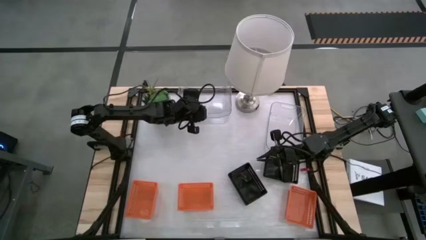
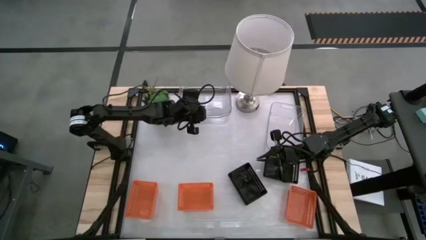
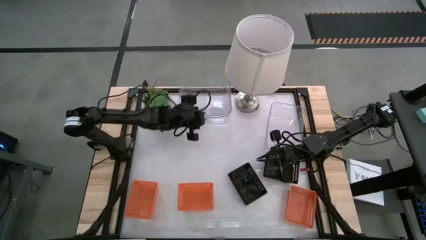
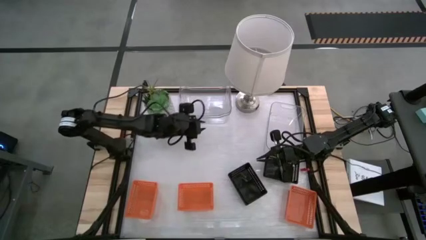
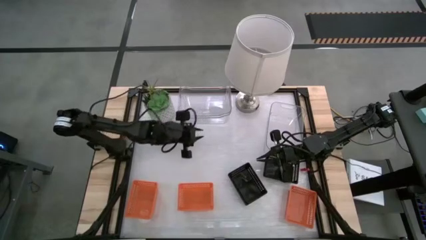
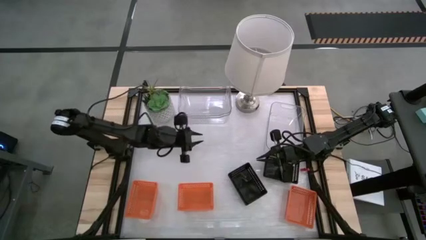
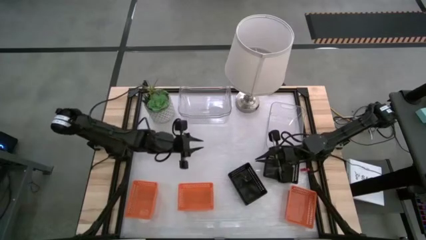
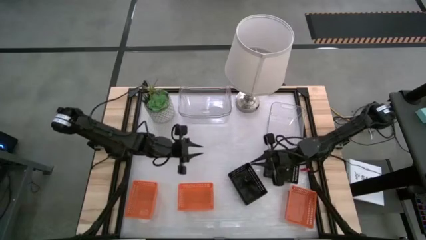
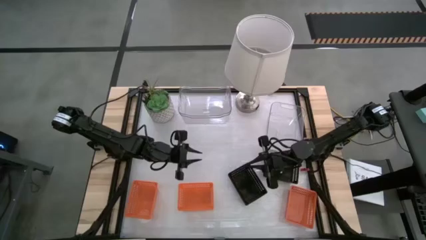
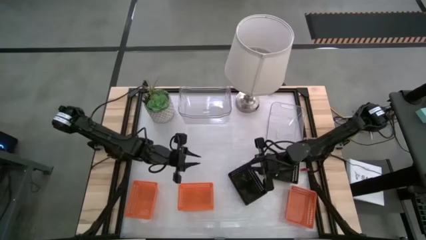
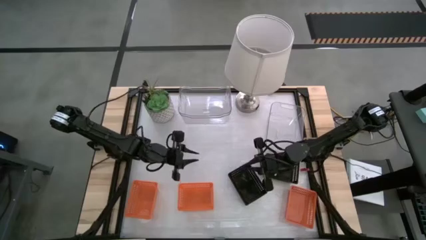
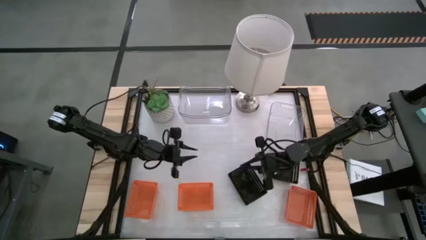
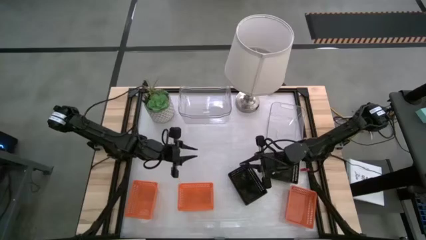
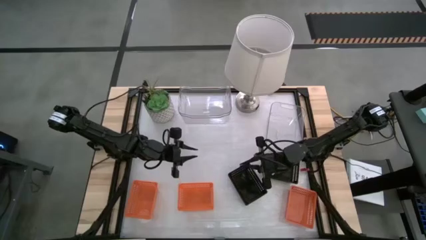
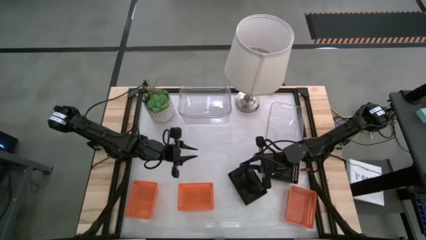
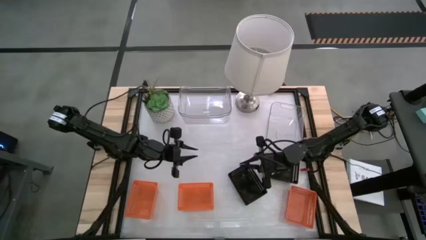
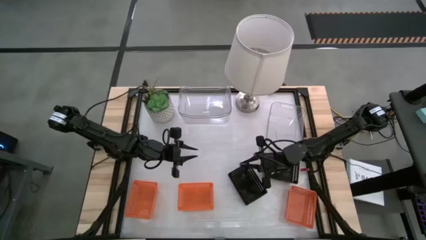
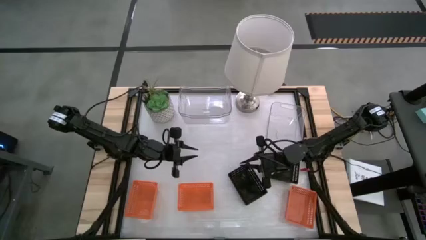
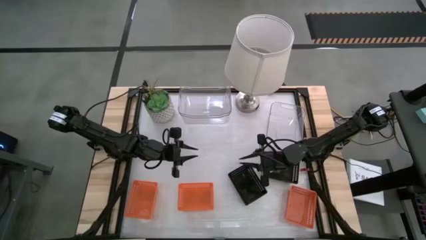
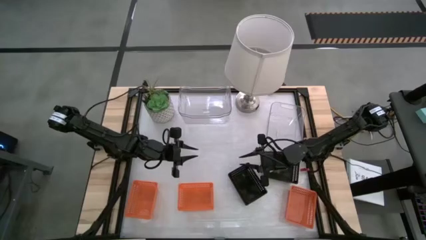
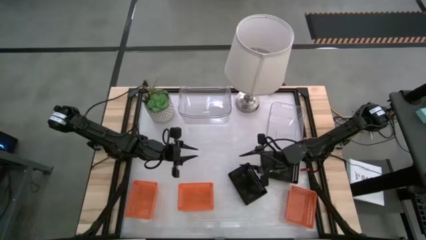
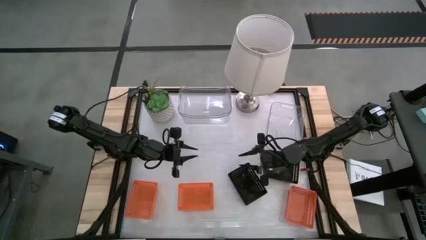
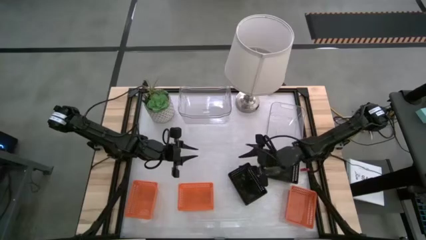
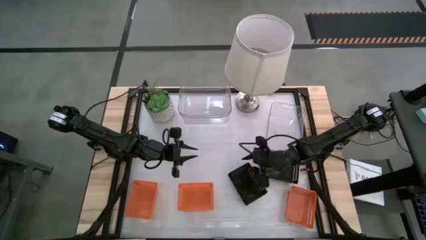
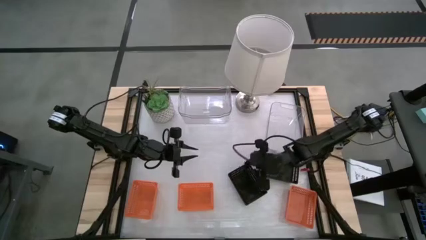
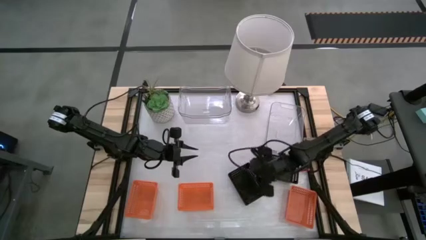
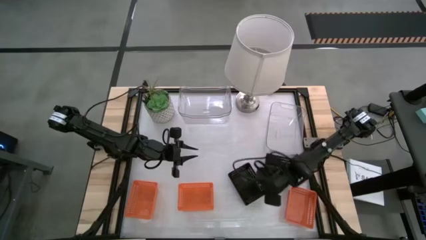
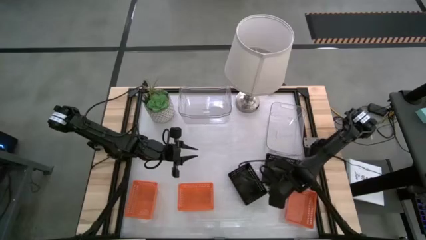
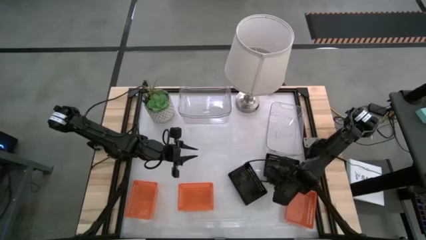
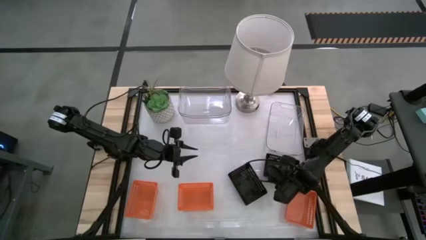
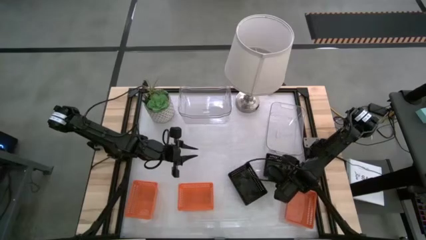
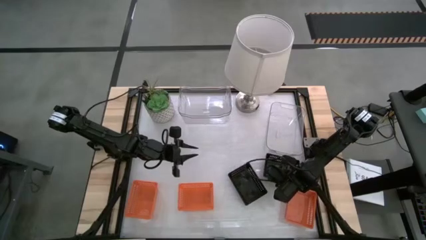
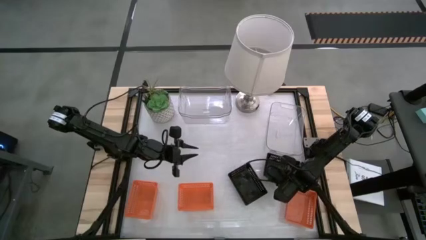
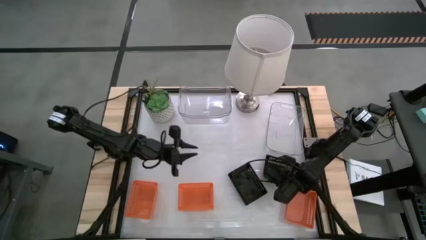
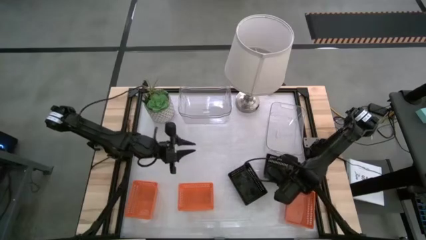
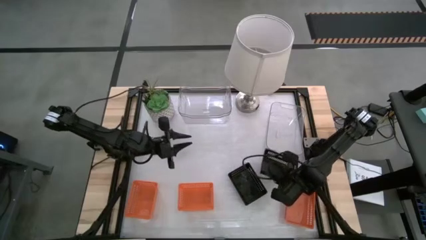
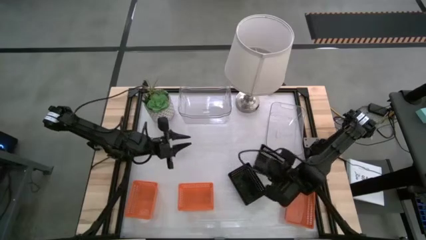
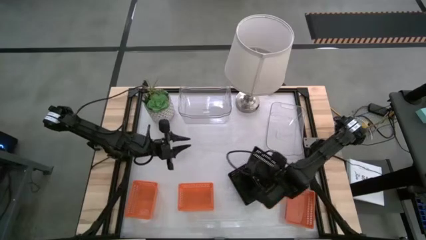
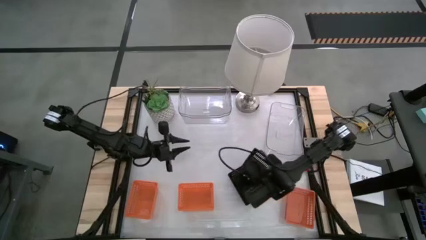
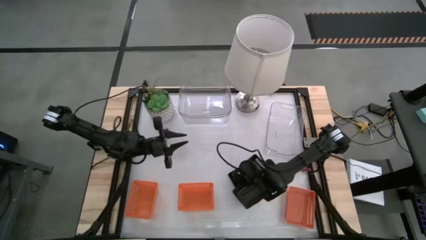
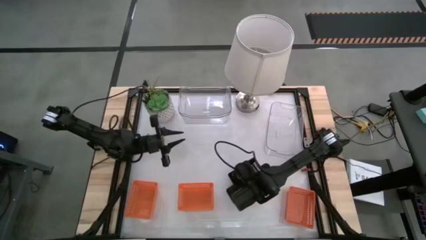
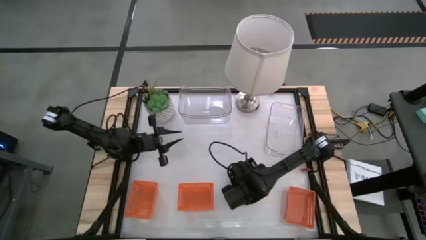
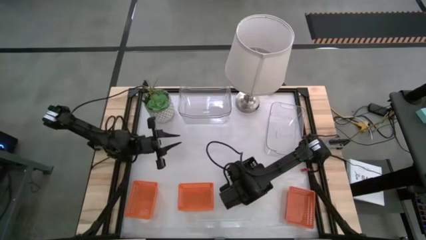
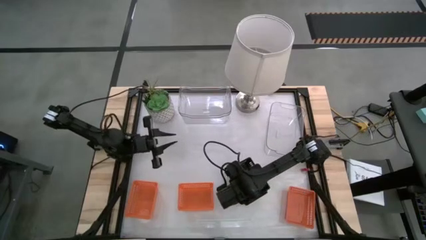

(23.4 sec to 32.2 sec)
Stack the right black bin on the left black bins
